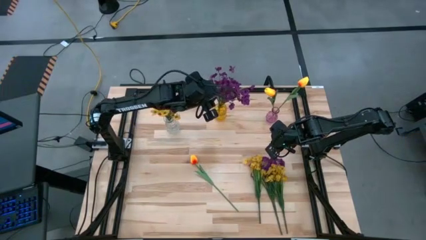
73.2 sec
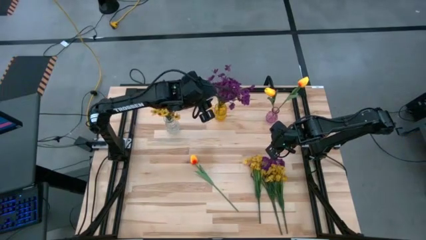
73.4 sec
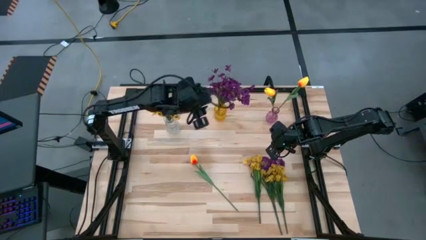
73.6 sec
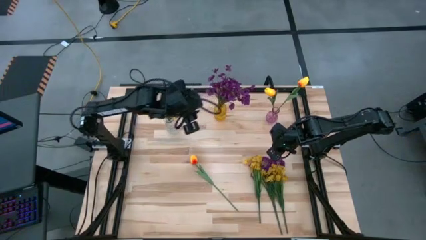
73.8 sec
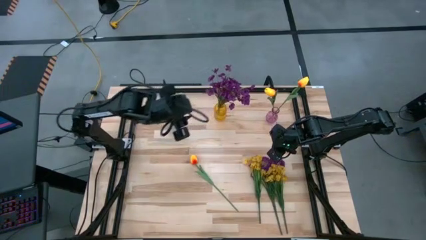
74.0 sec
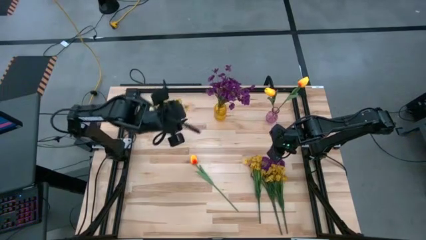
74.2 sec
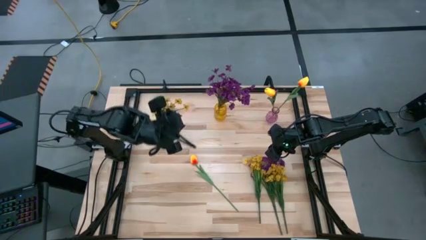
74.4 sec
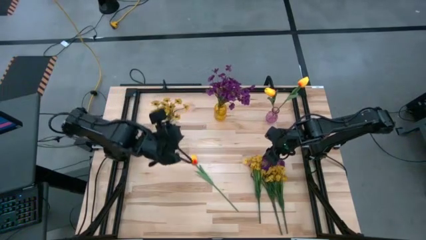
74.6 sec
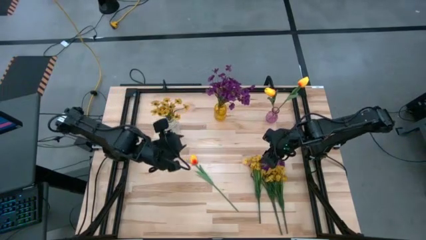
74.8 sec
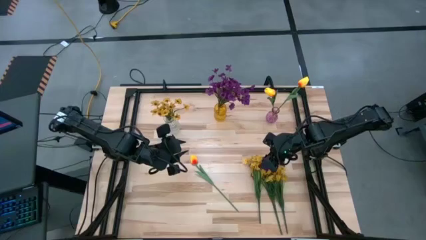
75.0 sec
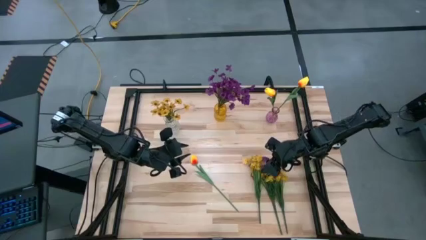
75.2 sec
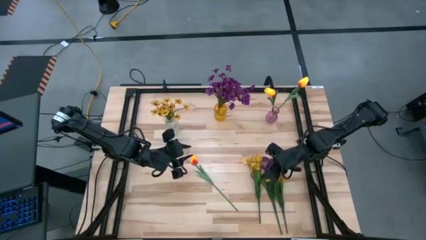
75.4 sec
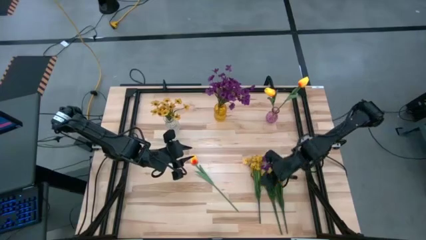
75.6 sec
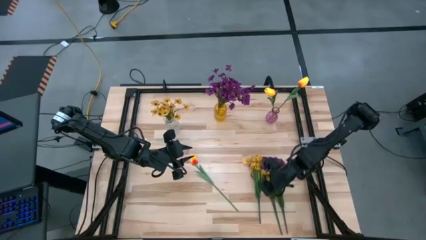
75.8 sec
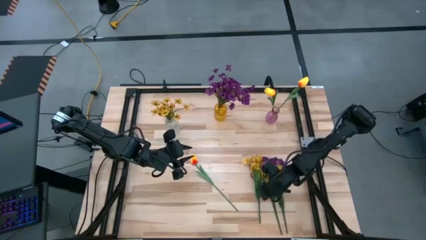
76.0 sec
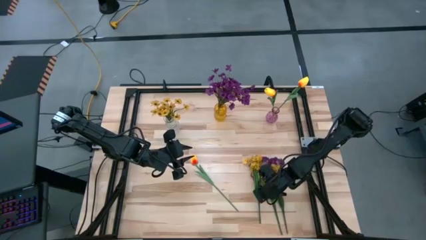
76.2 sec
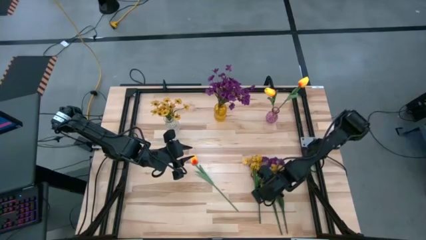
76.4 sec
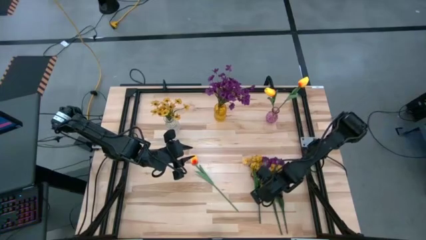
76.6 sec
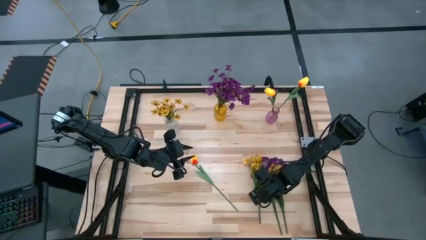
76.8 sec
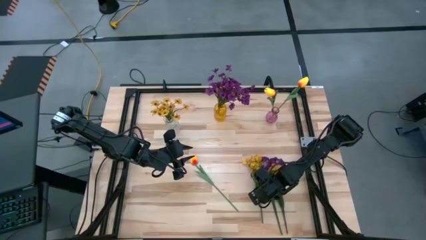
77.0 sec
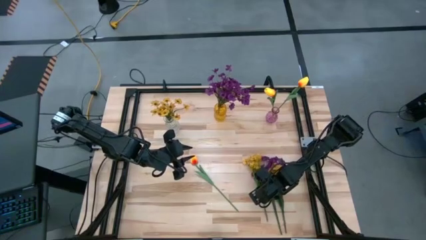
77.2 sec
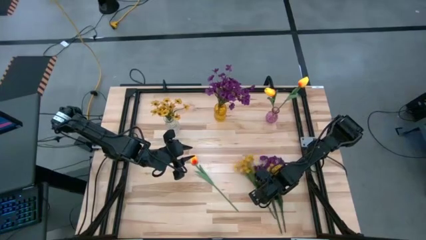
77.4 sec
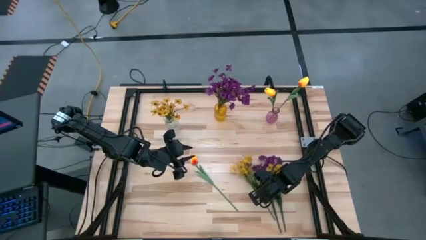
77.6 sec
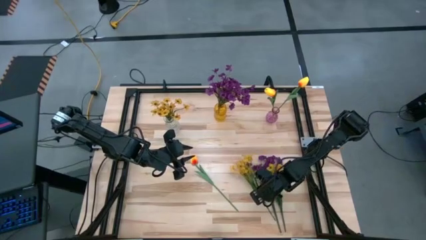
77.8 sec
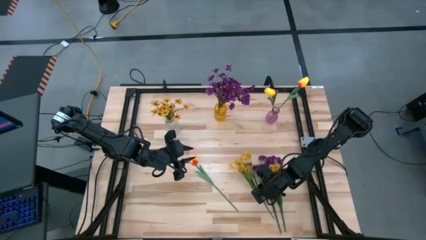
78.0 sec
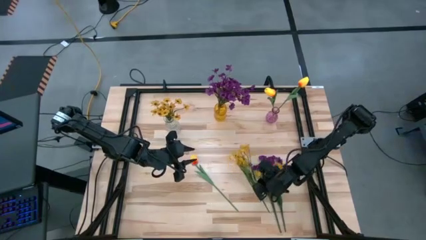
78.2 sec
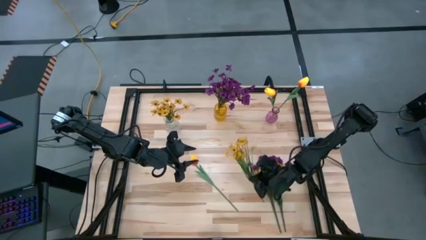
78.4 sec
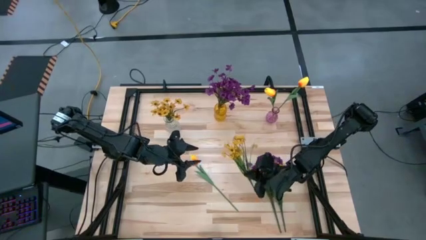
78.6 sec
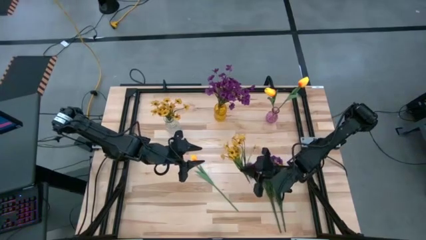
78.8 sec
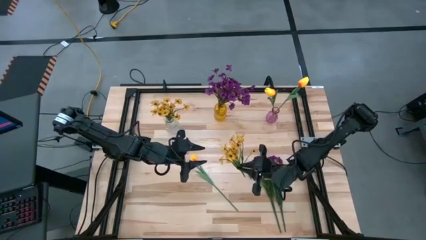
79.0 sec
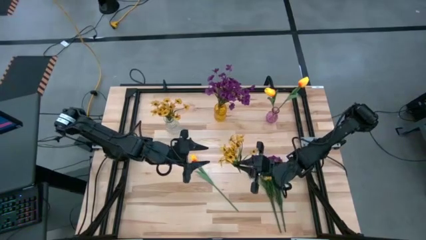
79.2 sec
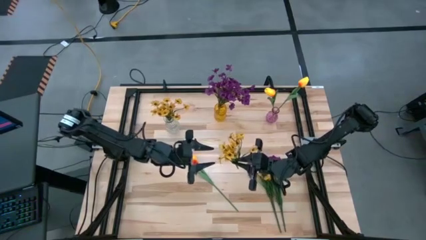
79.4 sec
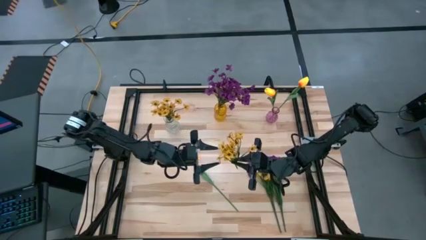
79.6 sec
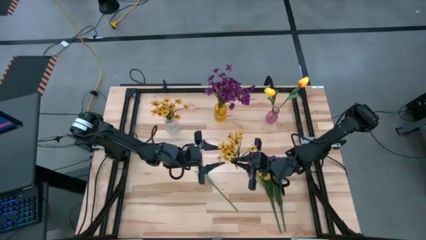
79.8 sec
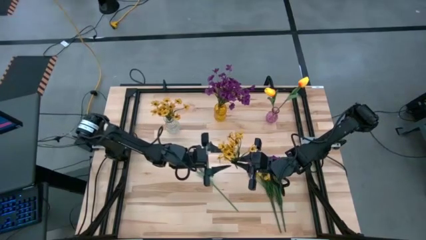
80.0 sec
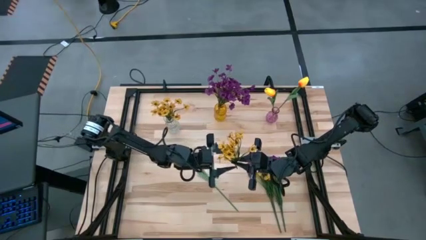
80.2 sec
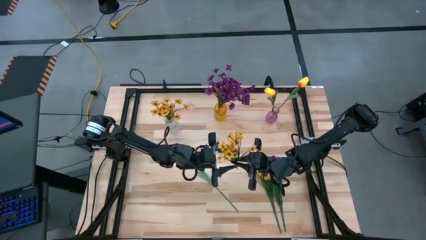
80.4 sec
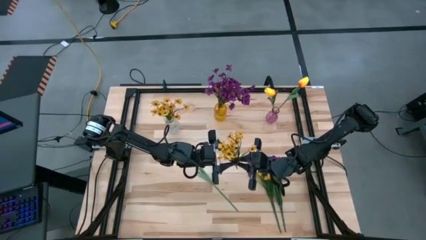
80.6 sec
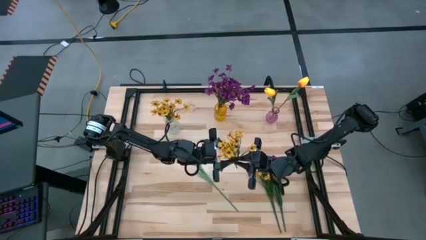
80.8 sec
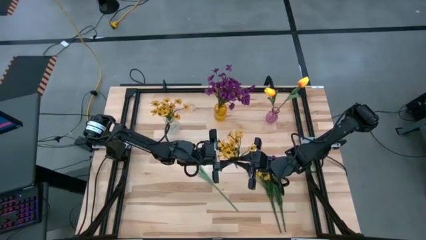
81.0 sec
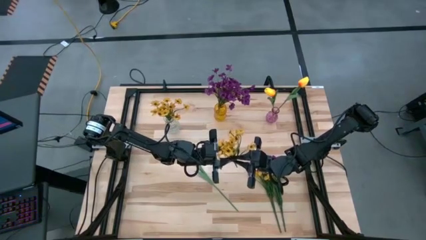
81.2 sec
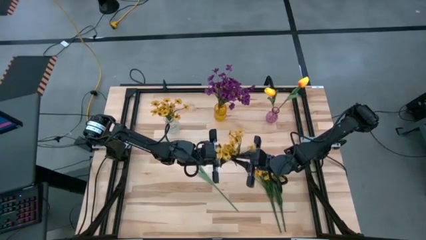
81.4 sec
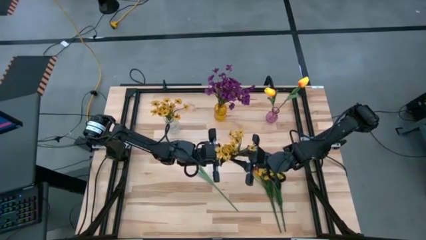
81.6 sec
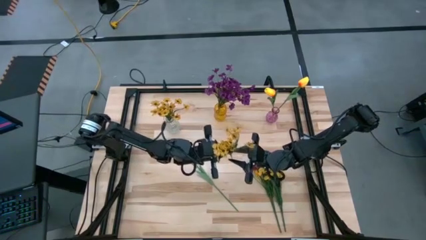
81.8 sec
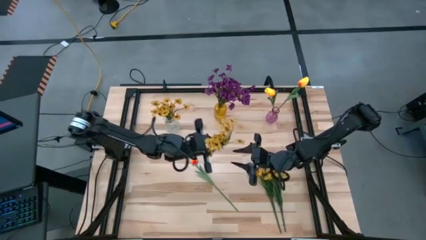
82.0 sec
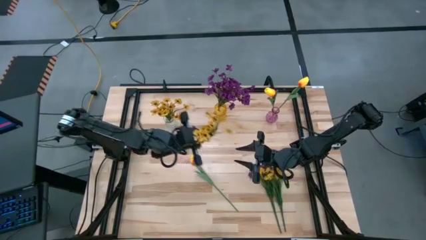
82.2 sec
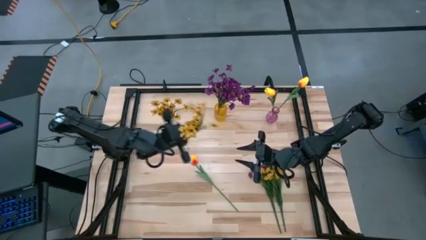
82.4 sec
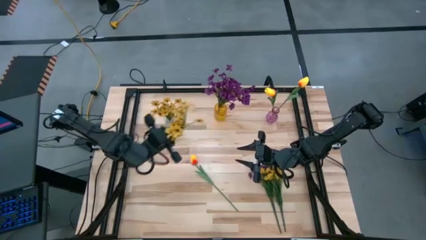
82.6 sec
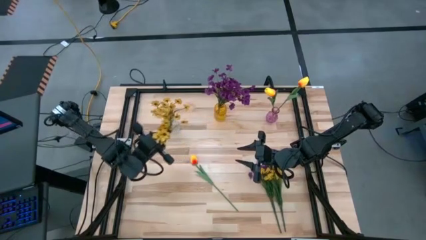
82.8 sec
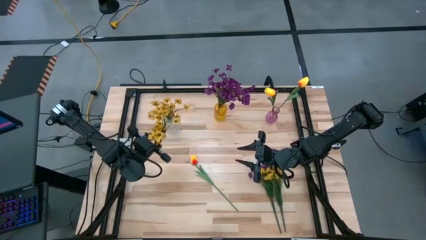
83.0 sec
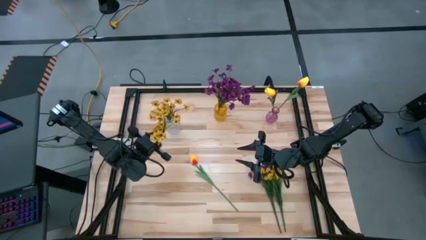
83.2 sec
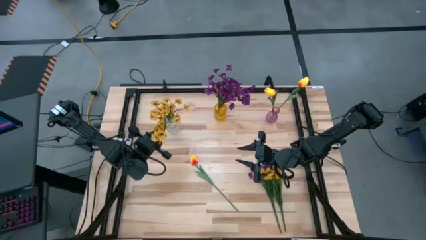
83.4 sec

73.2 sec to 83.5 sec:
Task: Sort flowers into vase by color
Put the left yellow flowers into the transparent vase

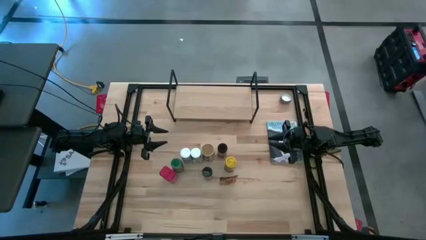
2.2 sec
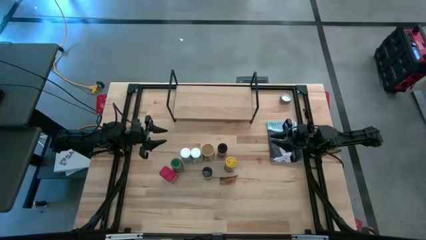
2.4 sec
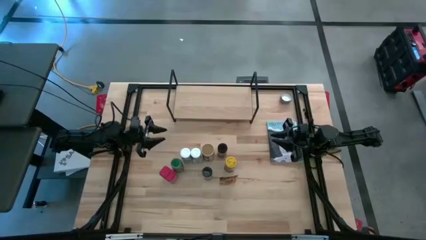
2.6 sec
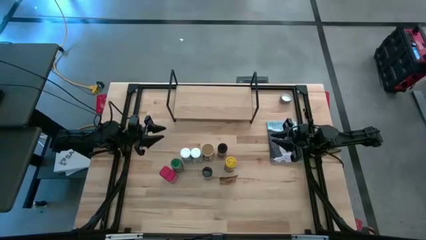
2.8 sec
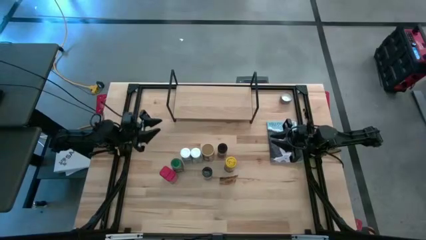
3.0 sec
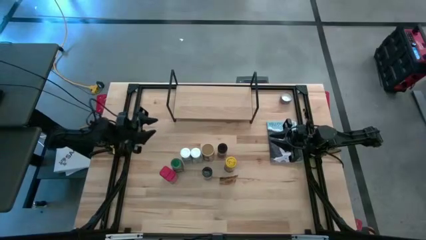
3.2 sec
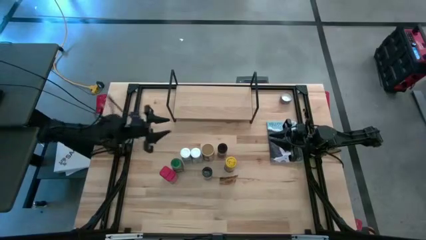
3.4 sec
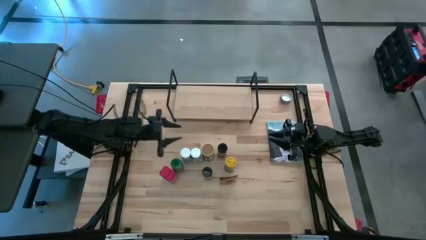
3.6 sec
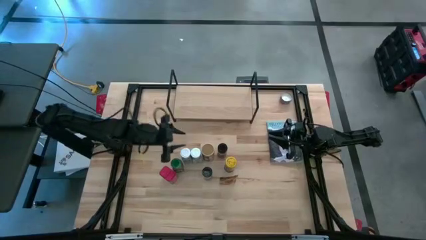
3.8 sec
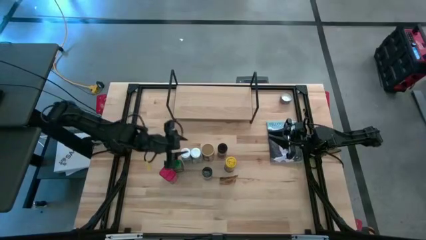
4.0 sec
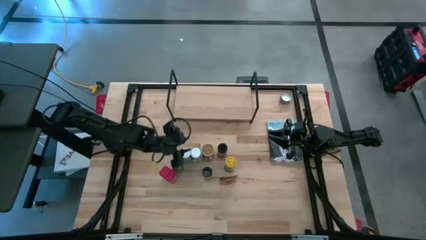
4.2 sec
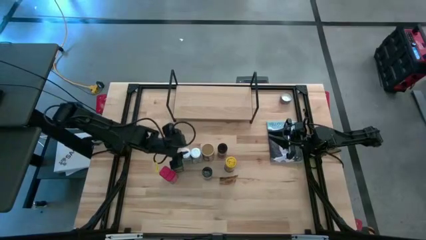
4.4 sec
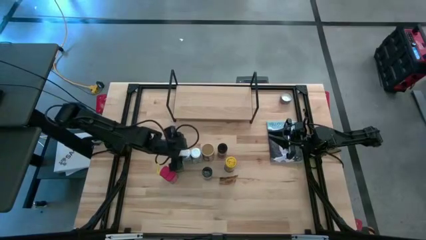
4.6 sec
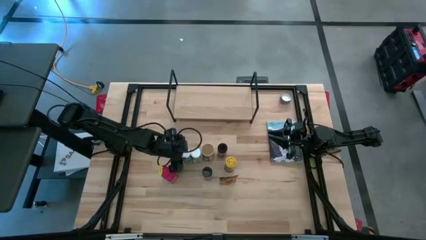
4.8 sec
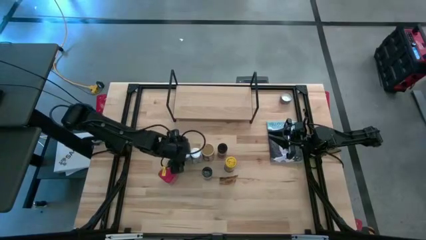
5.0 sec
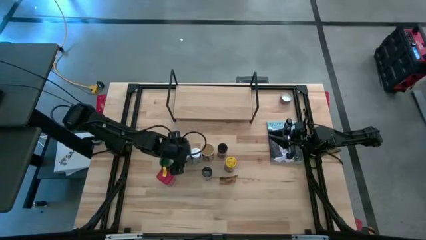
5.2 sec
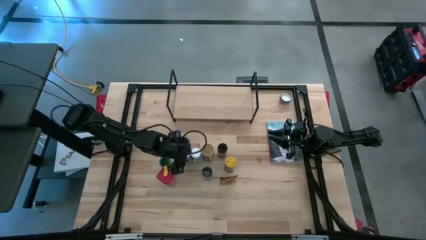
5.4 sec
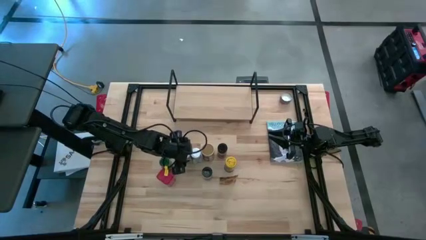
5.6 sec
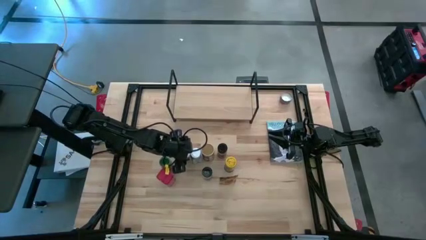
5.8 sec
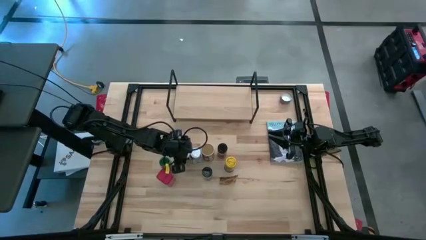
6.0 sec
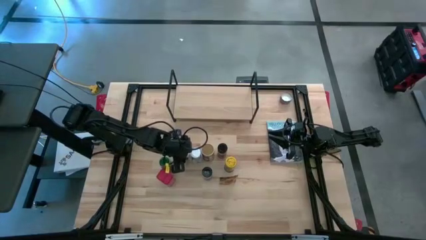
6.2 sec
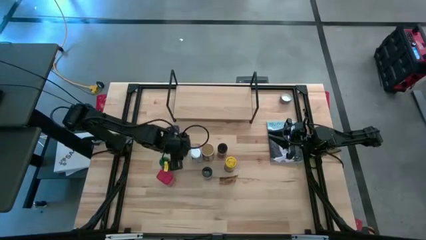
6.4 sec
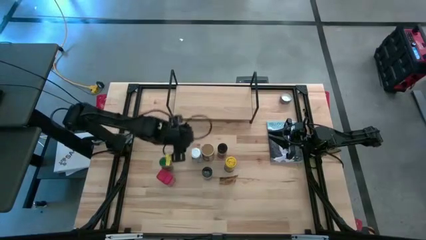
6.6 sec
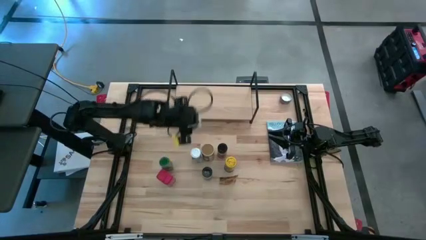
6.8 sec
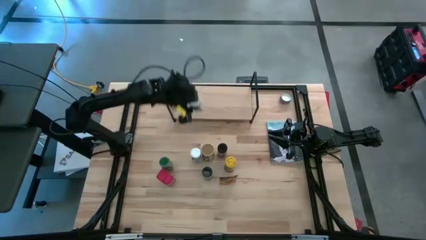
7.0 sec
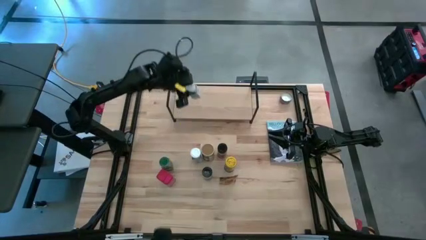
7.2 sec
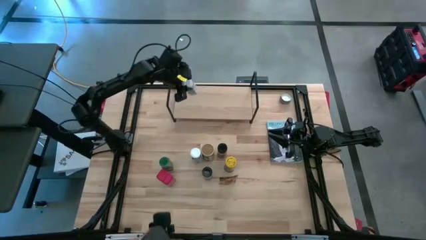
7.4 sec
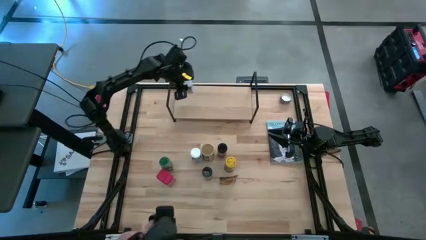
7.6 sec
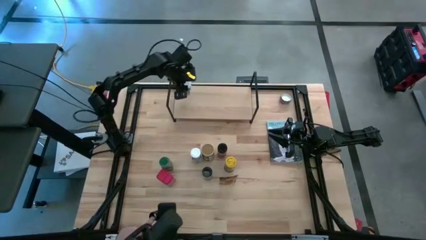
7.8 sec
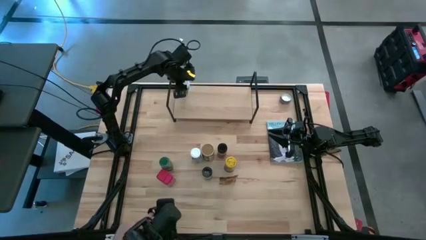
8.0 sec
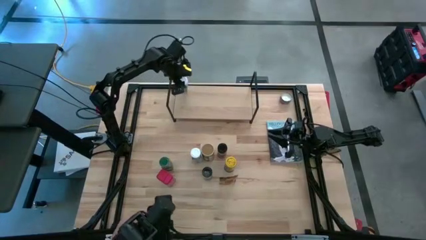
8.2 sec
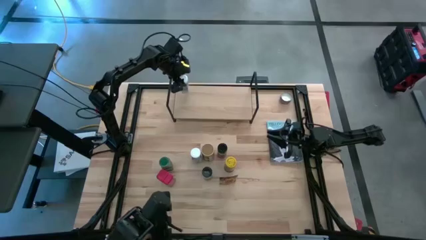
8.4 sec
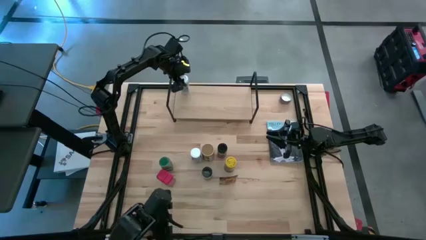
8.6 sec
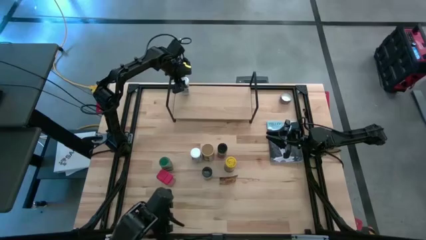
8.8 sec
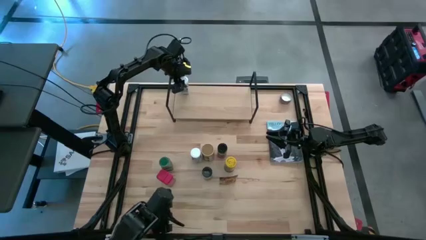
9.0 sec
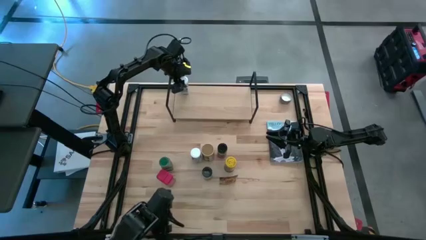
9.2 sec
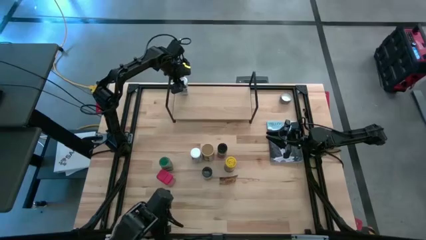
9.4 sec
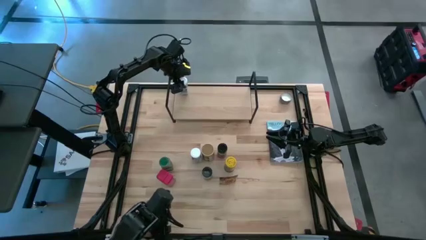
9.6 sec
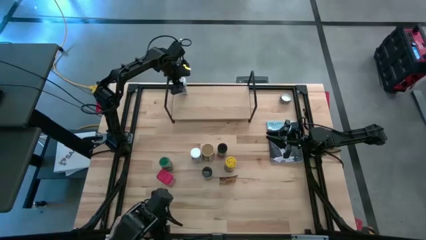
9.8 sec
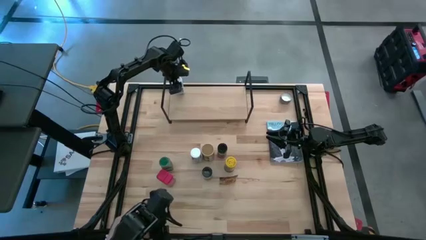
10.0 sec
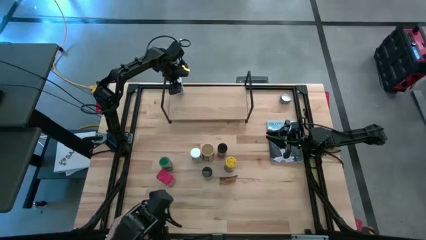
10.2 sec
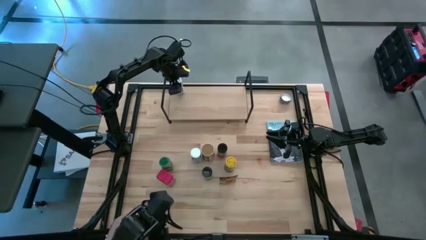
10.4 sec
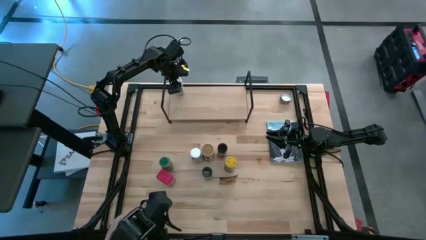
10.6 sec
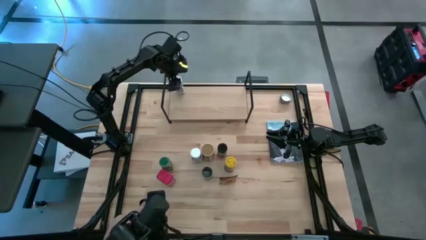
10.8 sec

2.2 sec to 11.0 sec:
Task: Shelf spices
Put the left white seasoning bottle on the shelf
